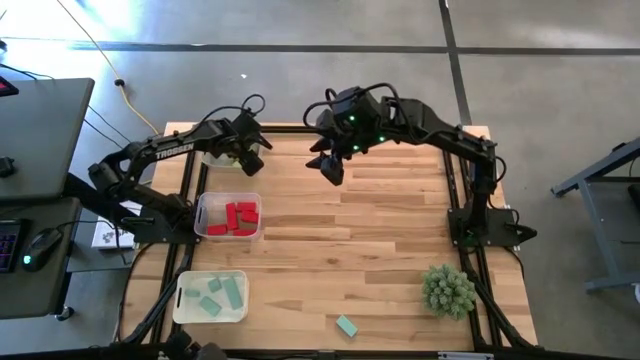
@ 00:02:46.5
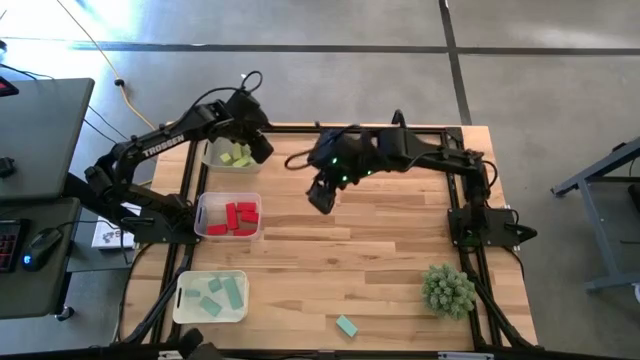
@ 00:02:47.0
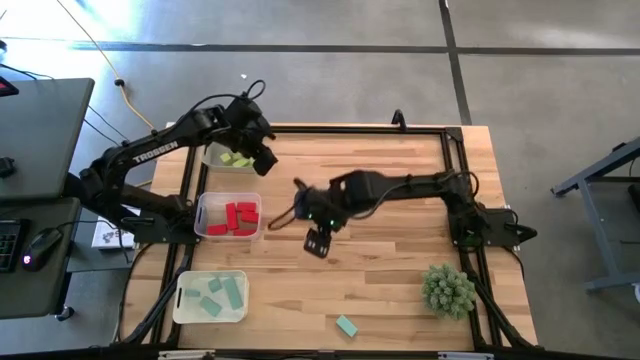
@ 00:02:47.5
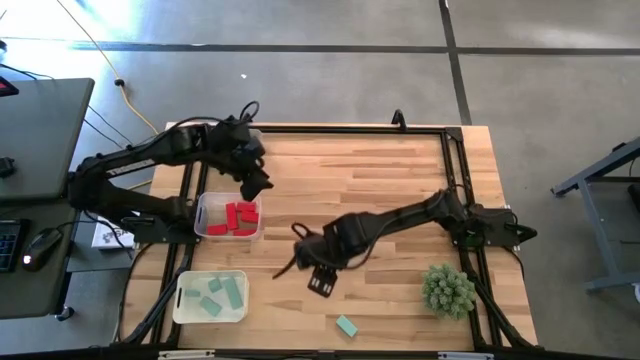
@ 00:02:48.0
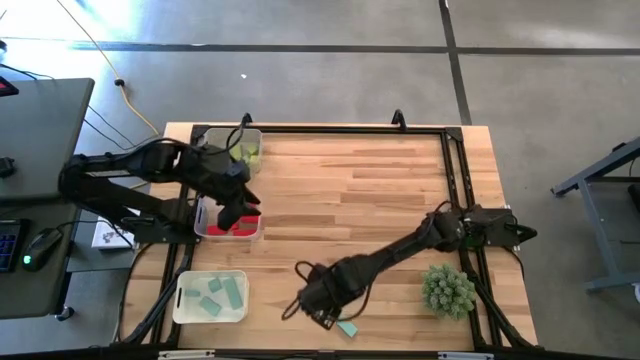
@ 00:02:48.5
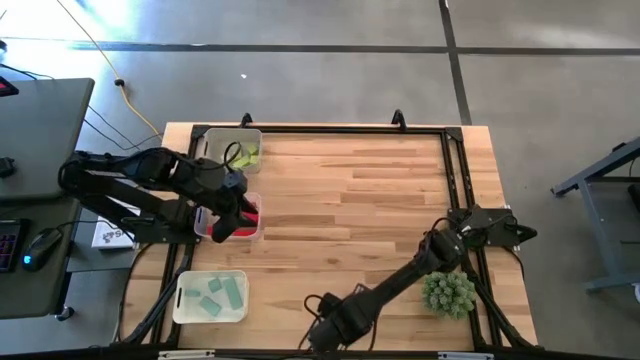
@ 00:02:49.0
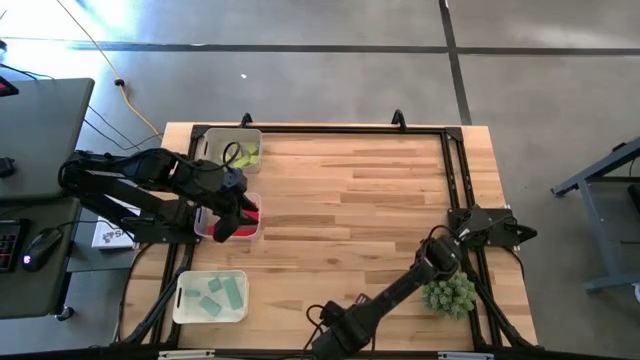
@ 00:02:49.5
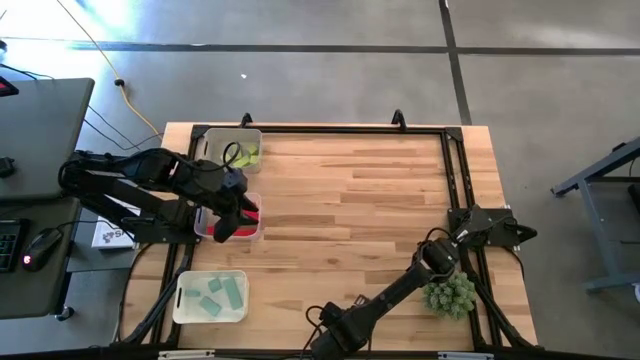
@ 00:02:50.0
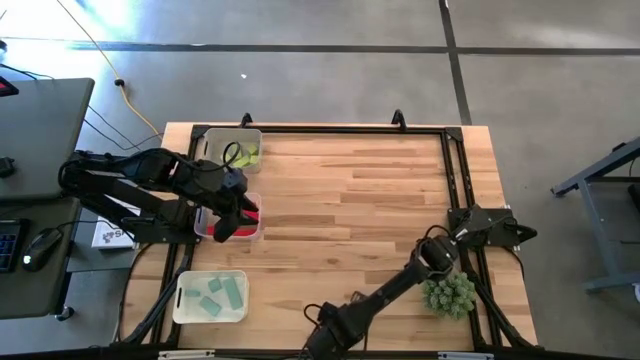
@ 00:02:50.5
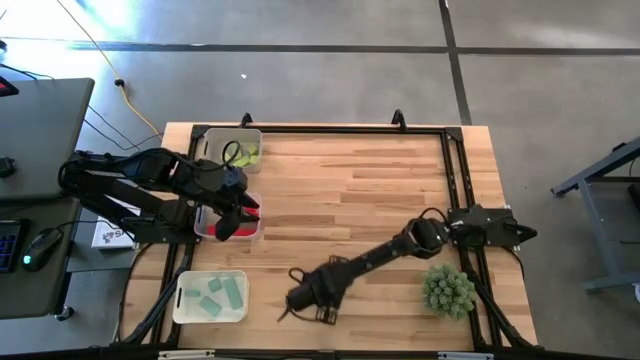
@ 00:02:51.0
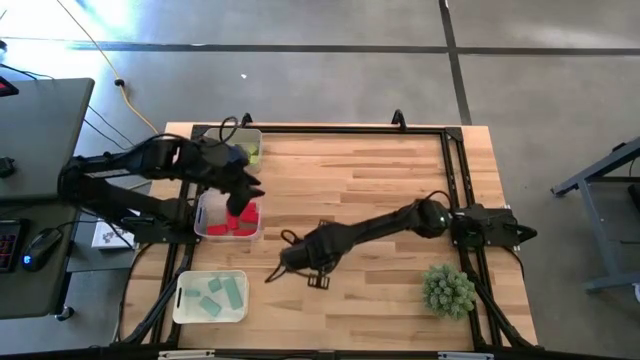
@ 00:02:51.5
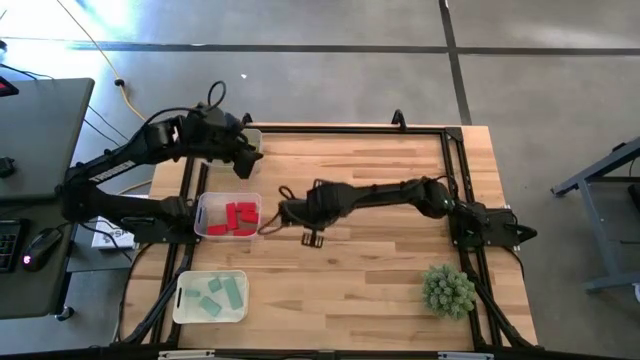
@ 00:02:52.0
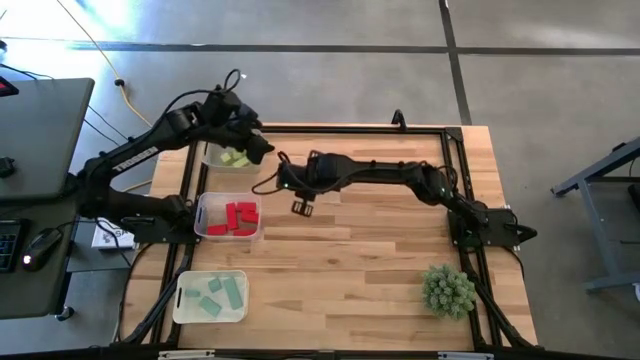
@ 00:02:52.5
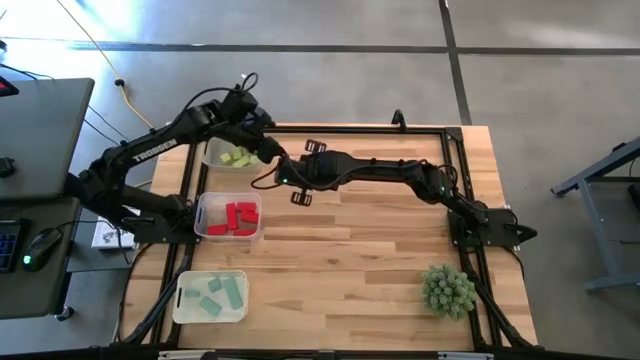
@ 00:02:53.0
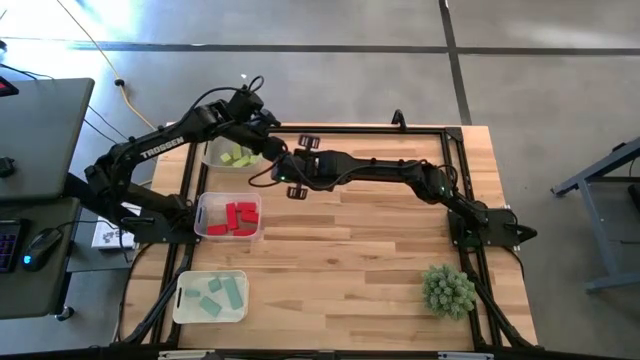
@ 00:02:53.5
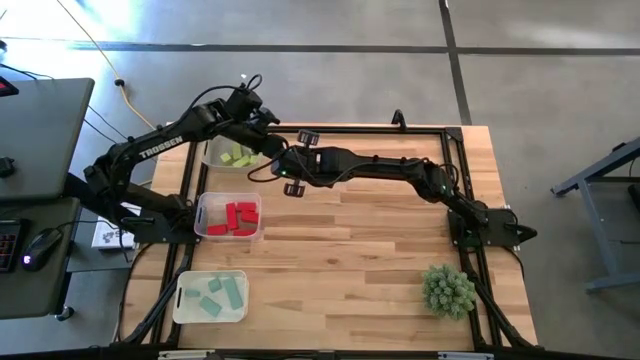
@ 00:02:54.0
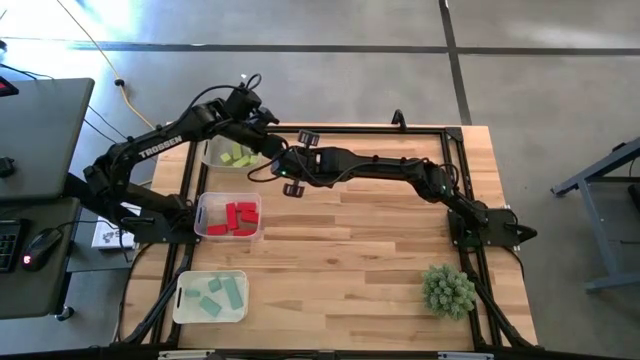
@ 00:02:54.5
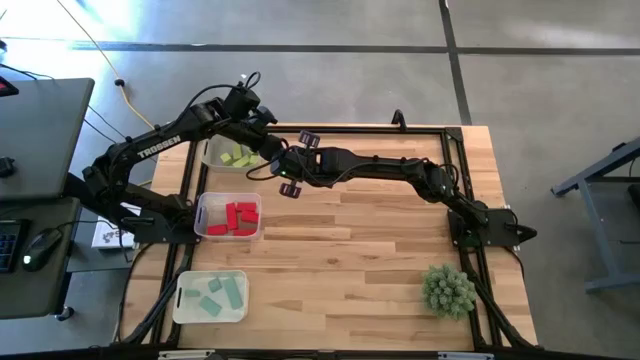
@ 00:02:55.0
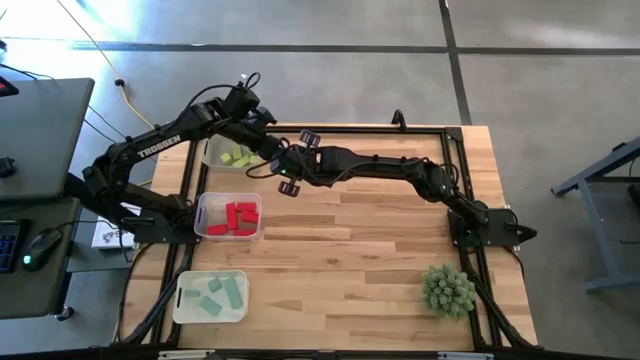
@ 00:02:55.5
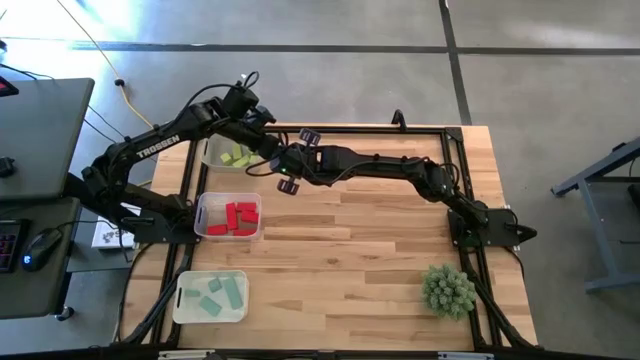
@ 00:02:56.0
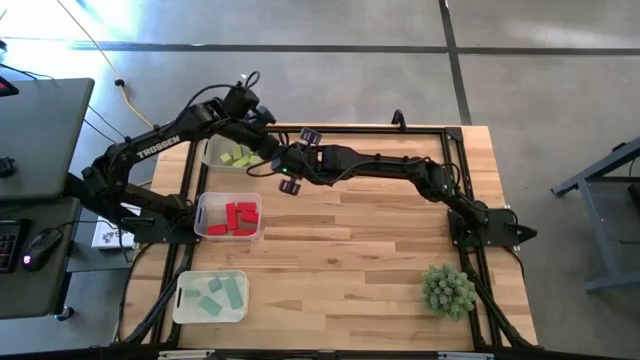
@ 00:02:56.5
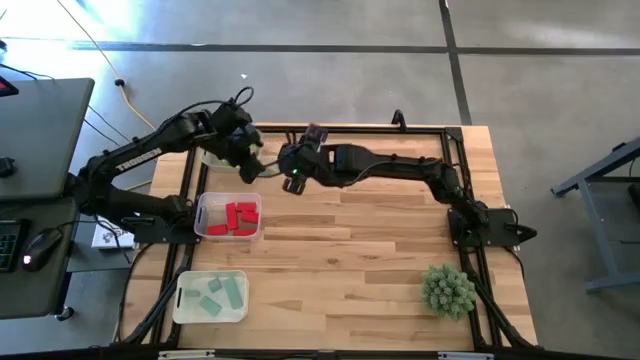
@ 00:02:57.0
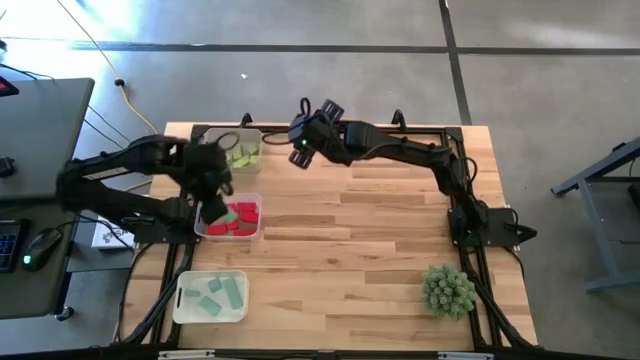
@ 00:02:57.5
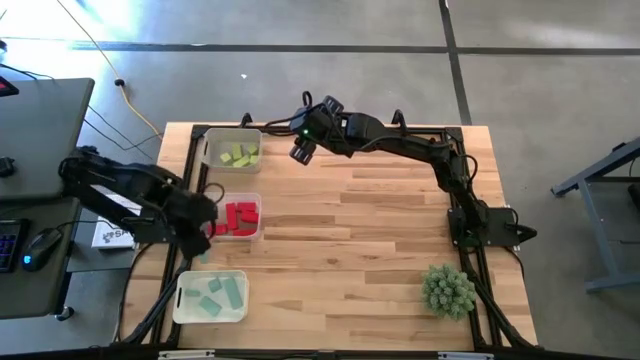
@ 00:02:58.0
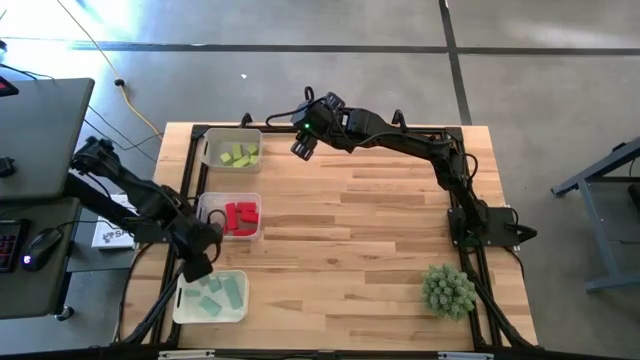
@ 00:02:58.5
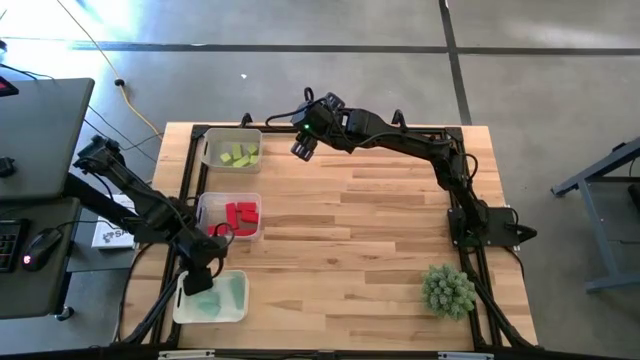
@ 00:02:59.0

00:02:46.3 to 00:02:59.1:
Task: Sort & place blocks by color
Put the light blue block into the white bin

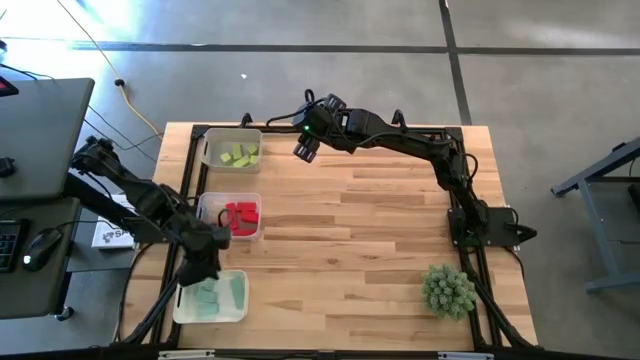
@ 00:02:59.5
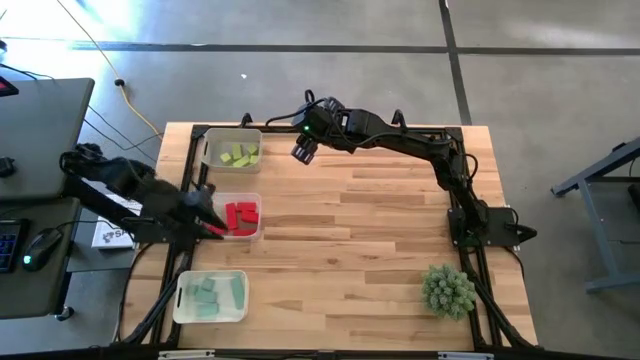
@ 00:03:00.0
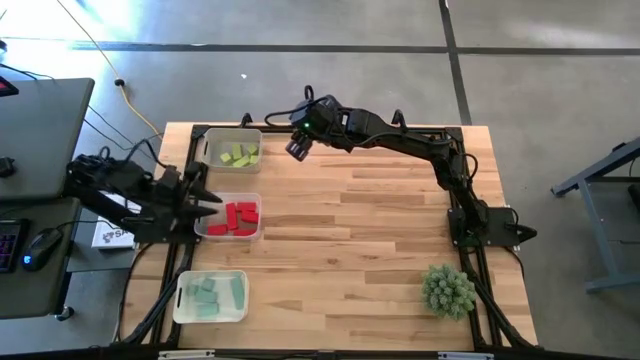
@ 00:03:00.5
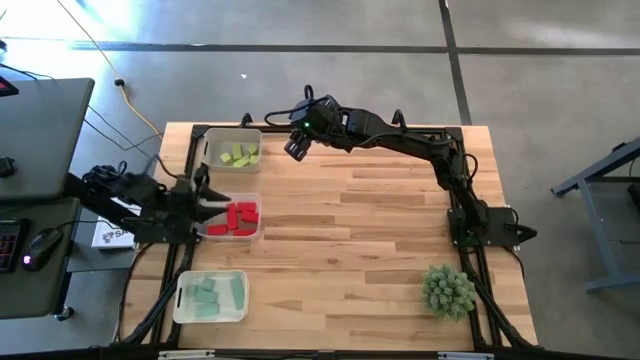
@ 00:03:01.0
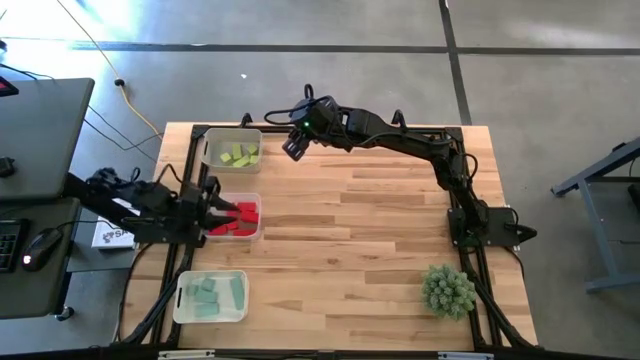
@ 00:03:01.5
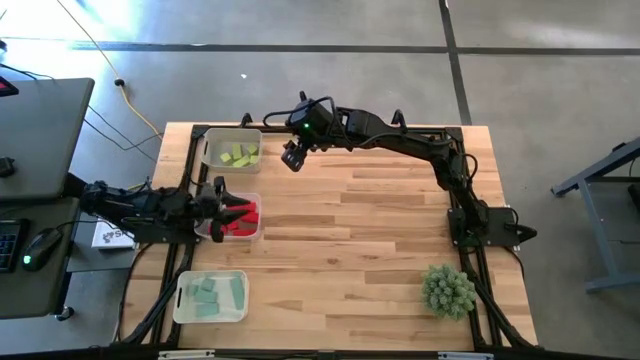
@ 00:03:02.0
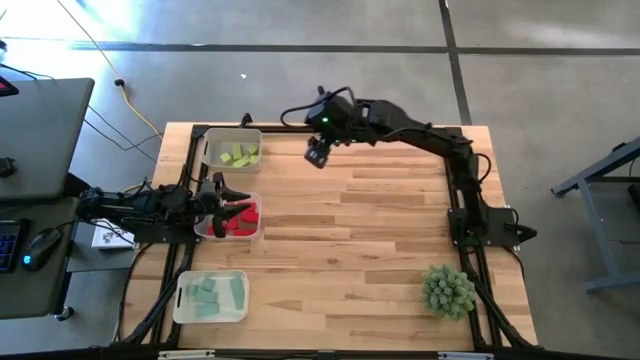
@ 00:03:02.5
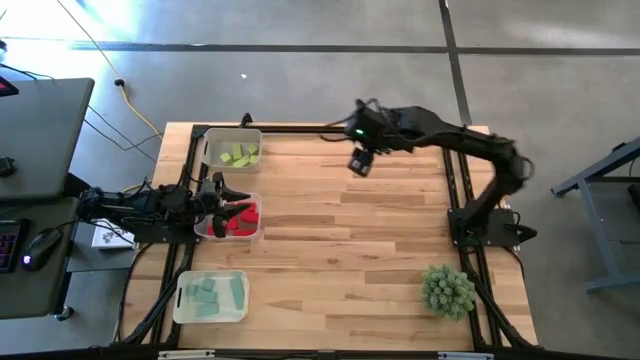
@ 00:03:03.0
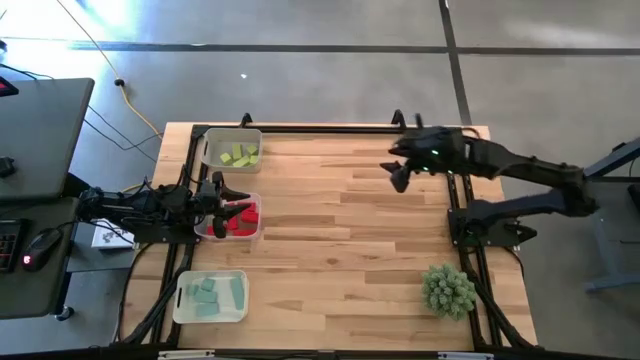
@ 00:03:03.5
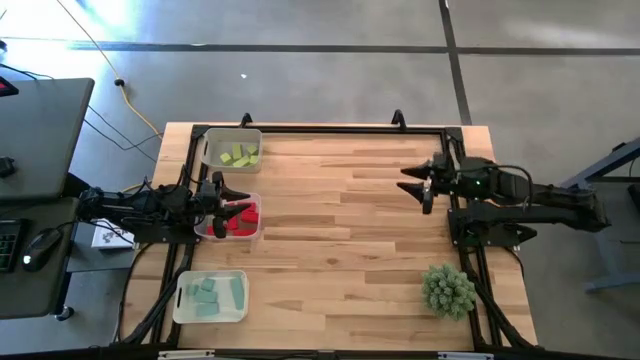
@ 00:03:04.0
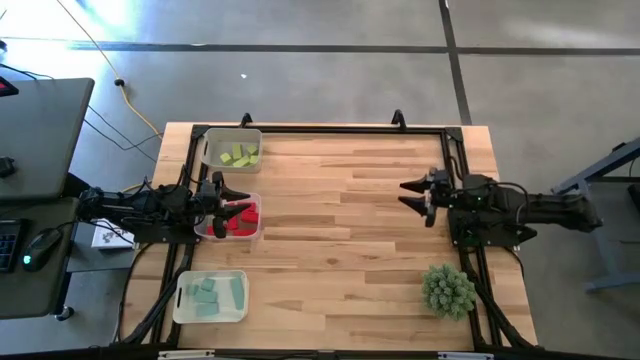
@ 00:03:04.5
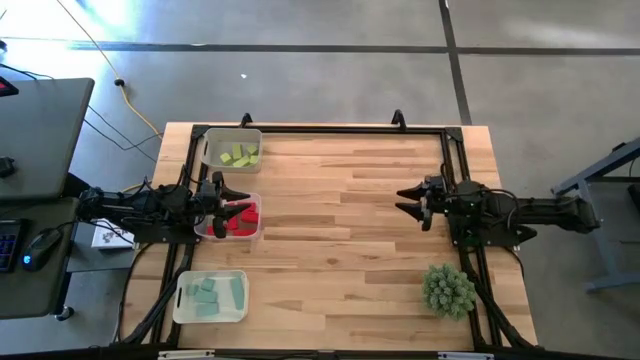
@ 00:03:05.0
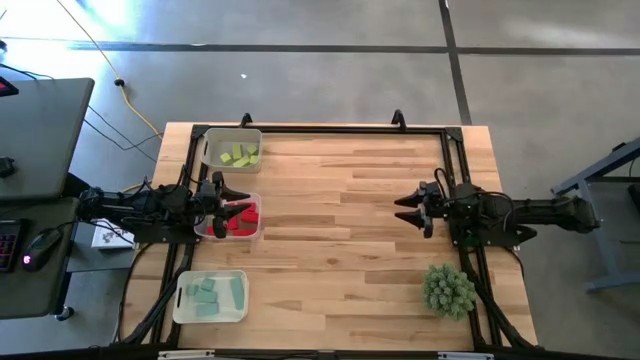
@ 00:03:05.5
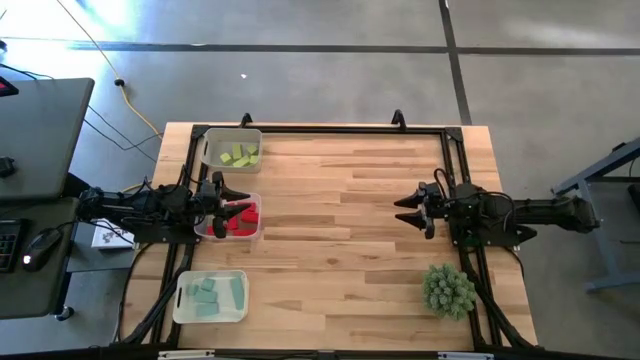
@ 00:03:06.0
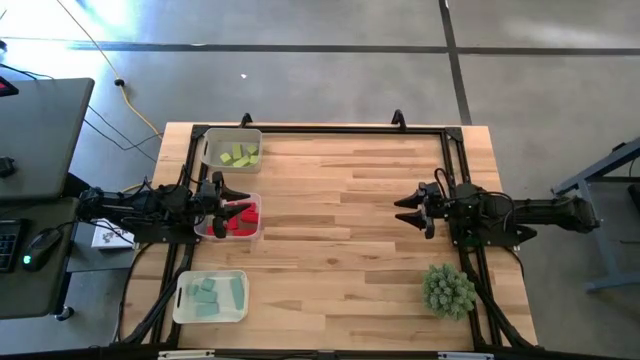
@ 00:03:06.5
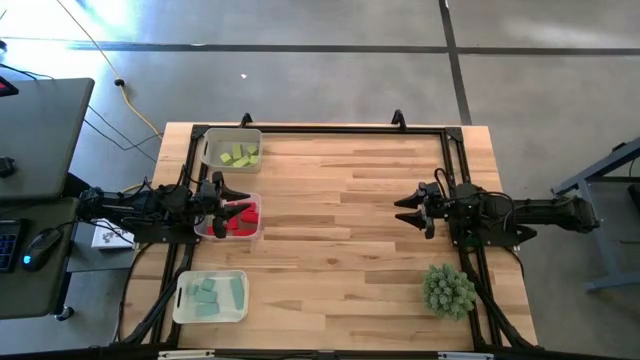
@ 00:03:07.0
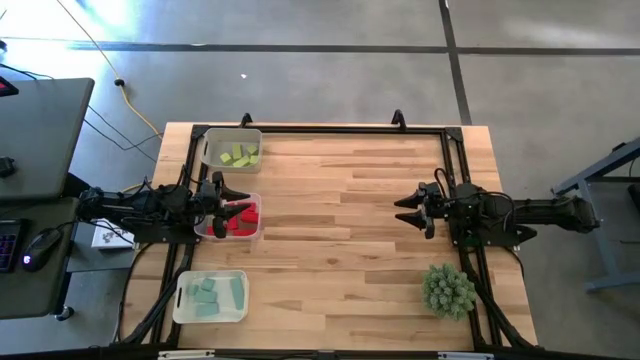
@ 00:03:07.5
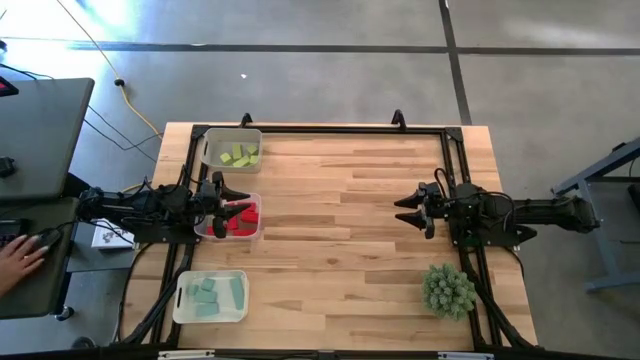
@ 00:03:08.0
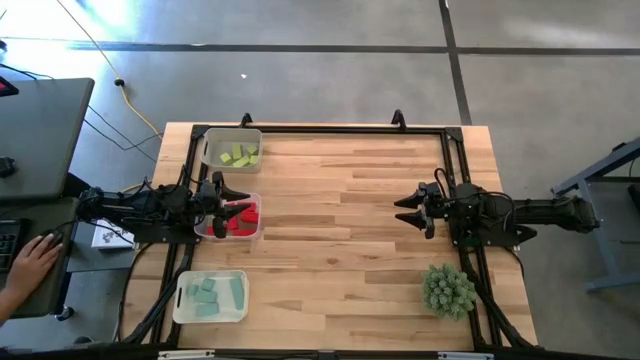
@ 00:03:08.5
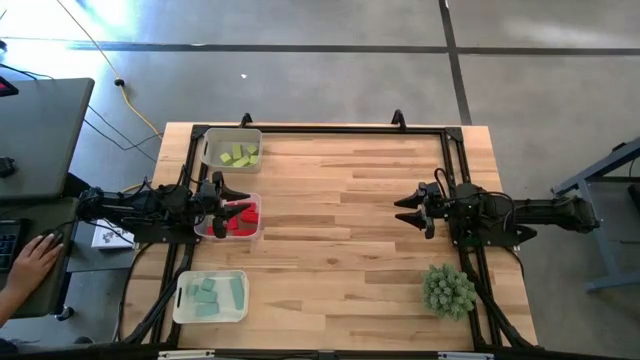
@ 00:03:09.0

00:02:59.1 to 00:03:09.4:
Return to home position
